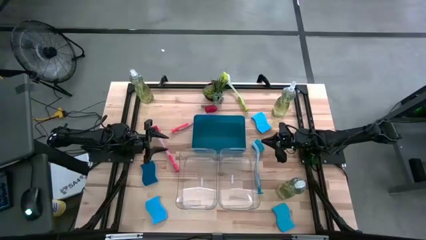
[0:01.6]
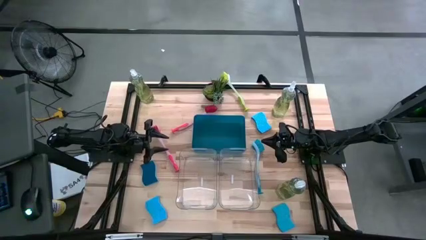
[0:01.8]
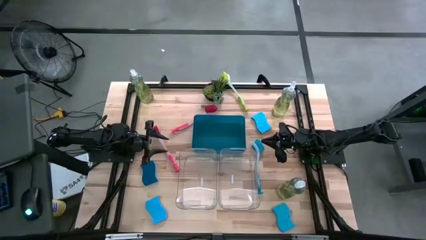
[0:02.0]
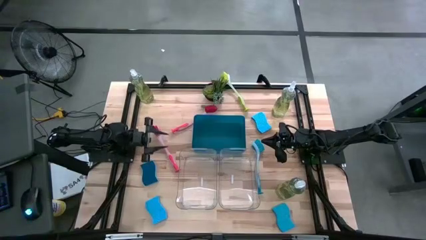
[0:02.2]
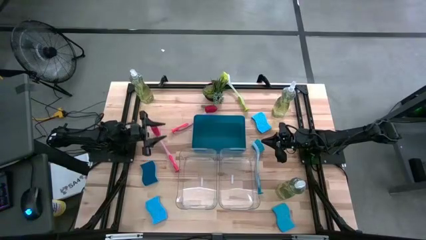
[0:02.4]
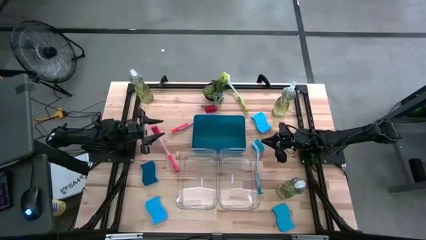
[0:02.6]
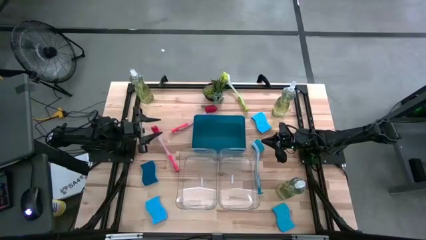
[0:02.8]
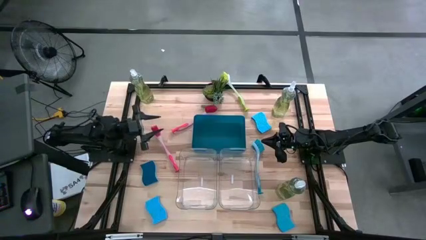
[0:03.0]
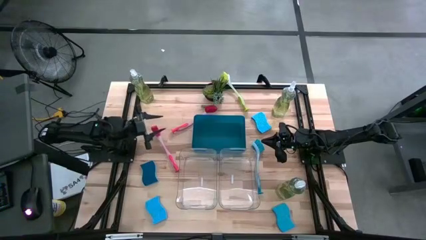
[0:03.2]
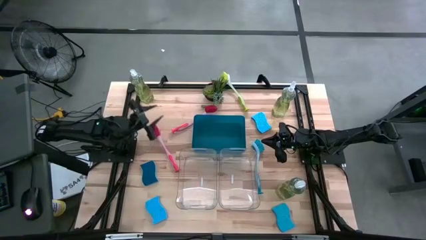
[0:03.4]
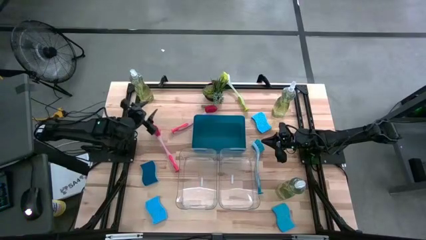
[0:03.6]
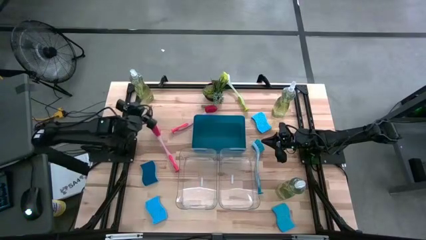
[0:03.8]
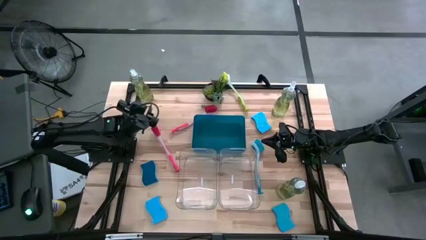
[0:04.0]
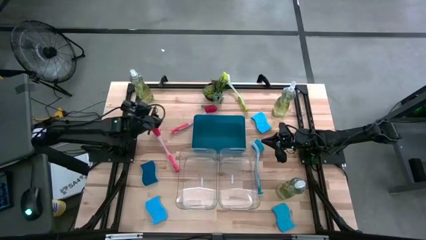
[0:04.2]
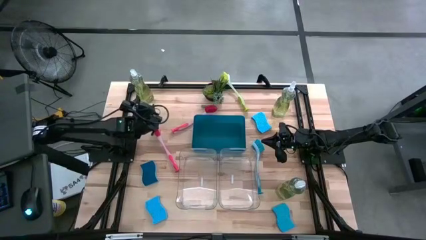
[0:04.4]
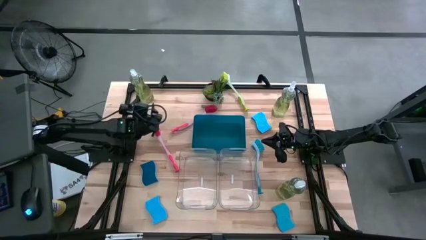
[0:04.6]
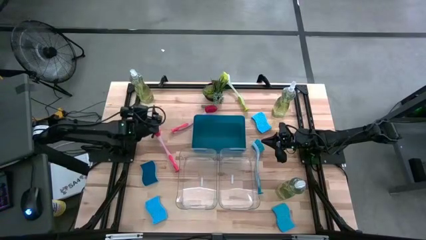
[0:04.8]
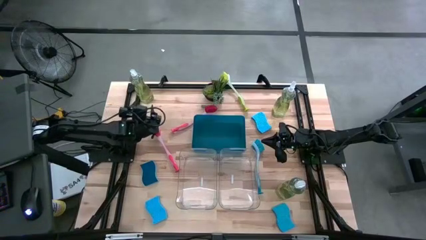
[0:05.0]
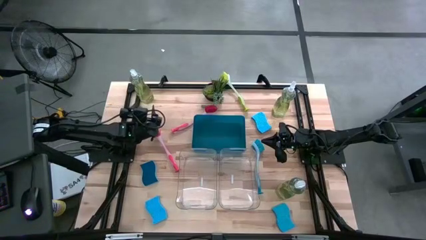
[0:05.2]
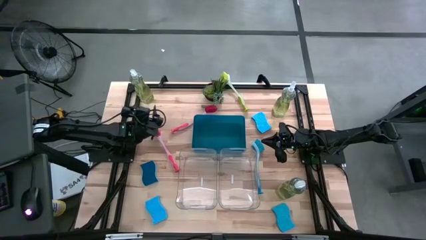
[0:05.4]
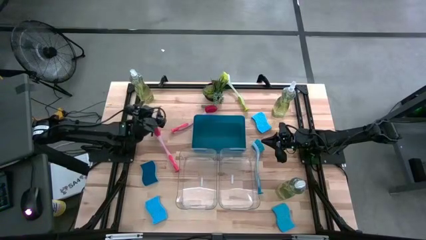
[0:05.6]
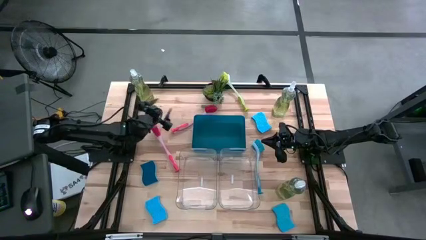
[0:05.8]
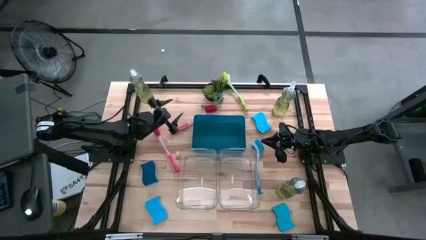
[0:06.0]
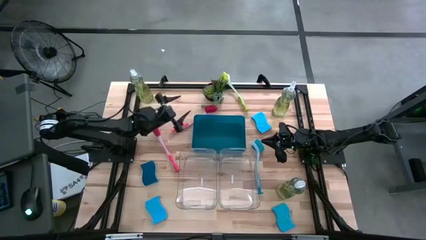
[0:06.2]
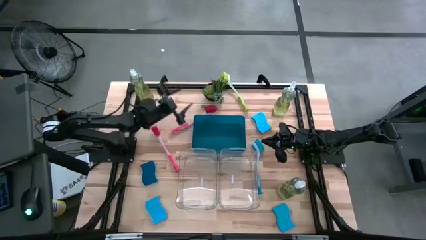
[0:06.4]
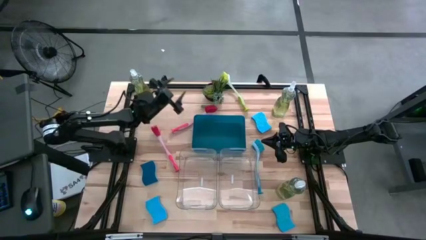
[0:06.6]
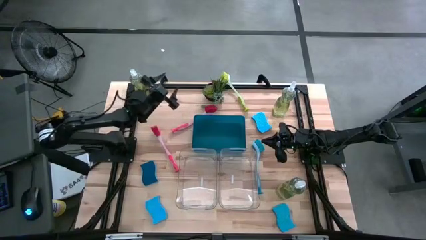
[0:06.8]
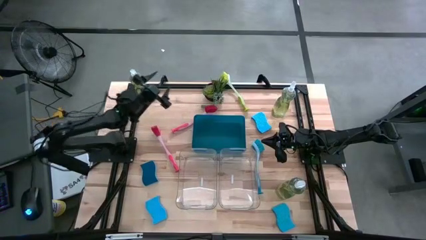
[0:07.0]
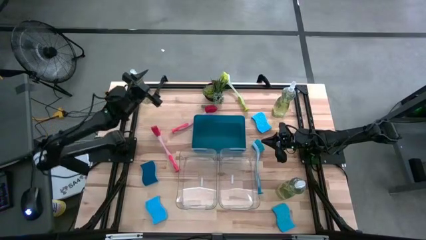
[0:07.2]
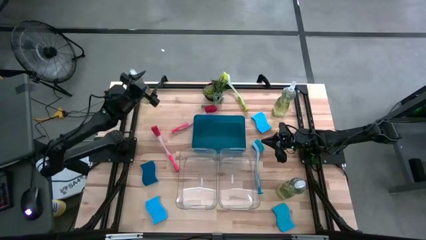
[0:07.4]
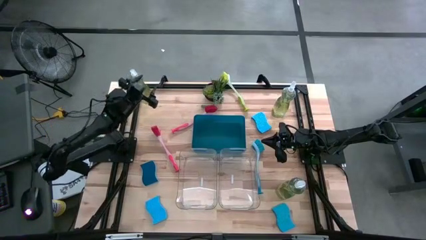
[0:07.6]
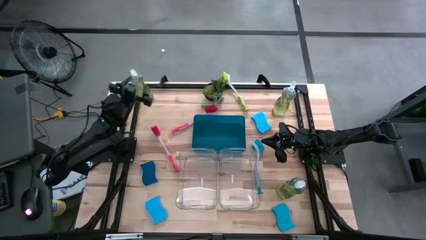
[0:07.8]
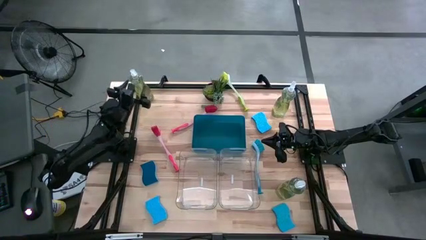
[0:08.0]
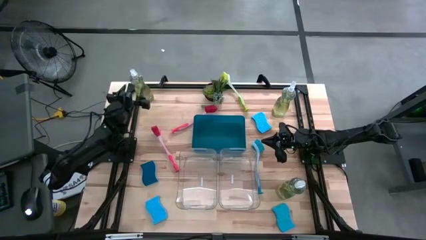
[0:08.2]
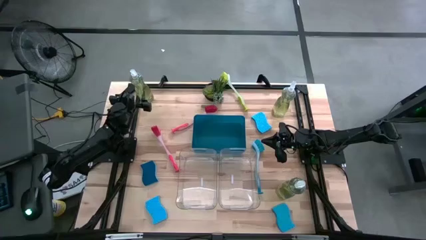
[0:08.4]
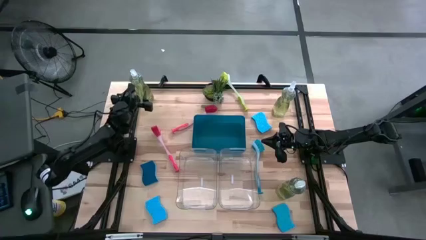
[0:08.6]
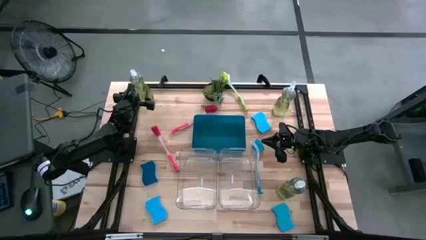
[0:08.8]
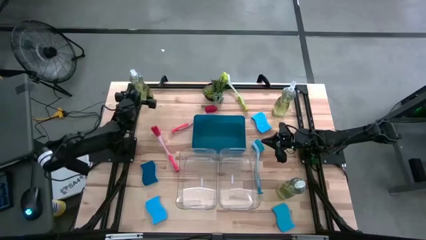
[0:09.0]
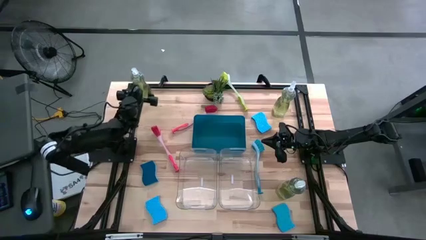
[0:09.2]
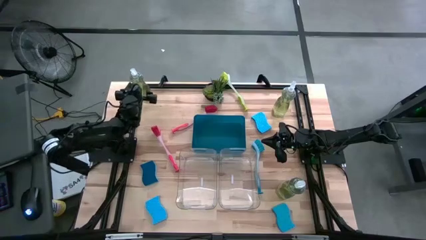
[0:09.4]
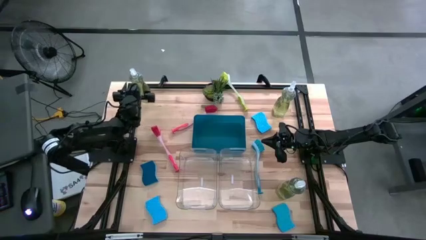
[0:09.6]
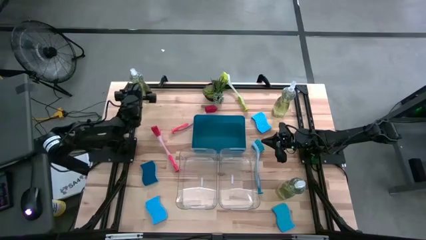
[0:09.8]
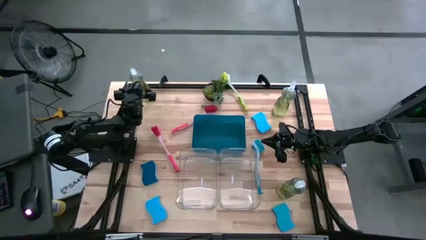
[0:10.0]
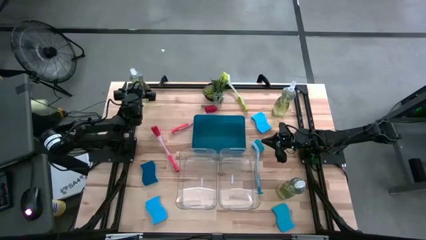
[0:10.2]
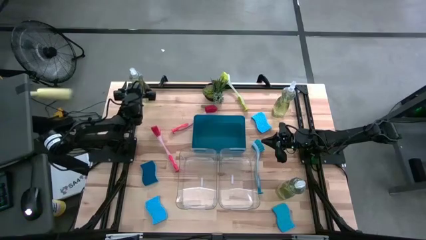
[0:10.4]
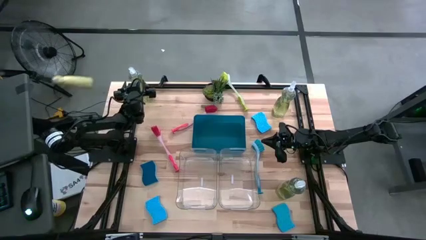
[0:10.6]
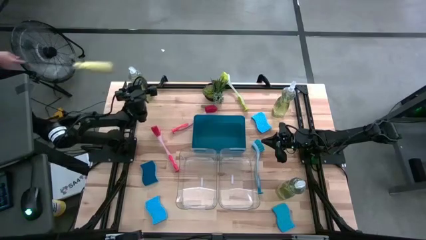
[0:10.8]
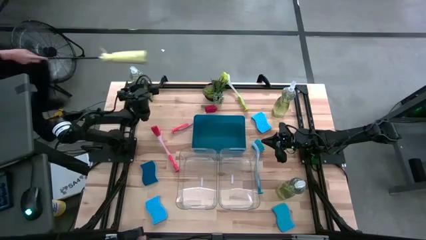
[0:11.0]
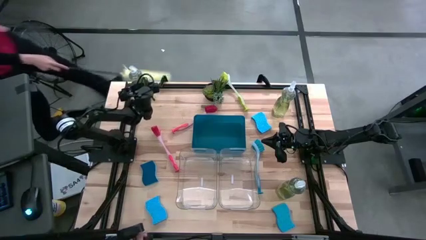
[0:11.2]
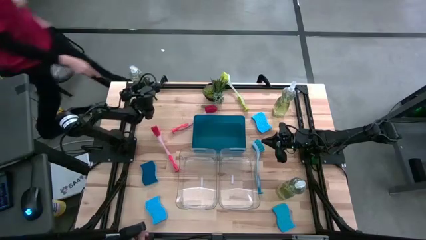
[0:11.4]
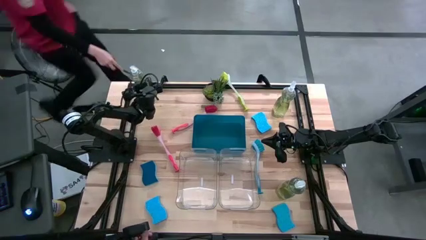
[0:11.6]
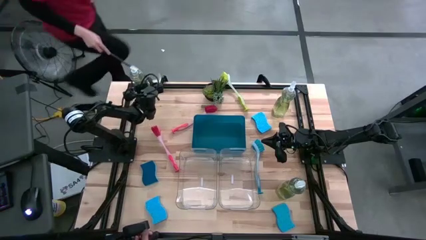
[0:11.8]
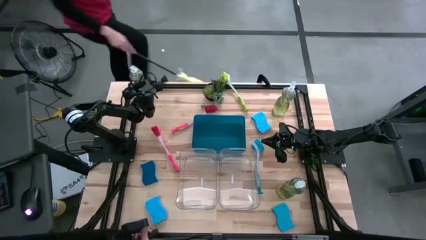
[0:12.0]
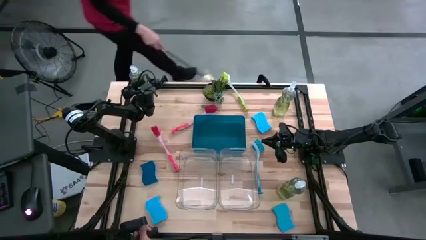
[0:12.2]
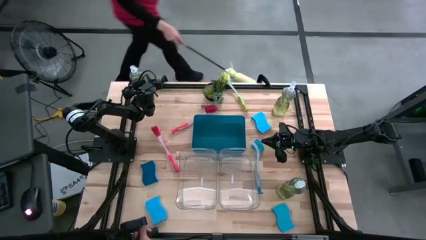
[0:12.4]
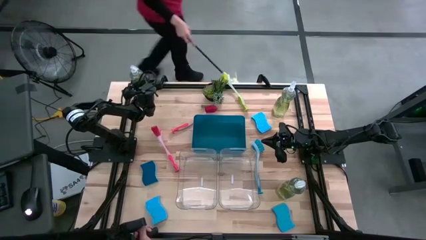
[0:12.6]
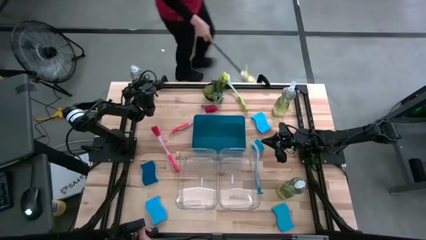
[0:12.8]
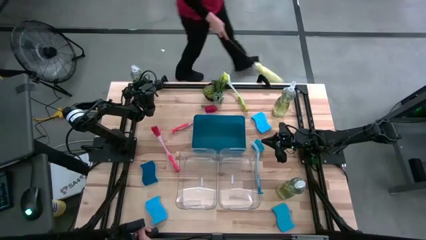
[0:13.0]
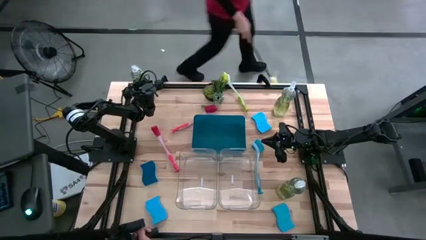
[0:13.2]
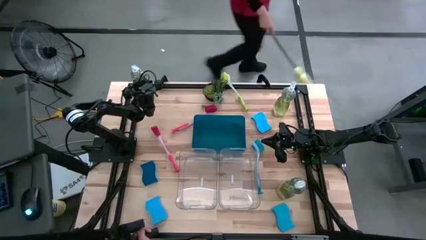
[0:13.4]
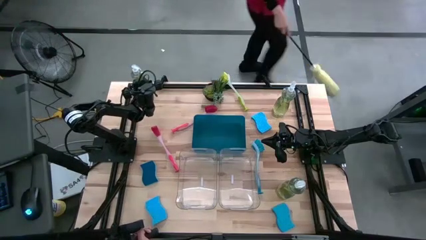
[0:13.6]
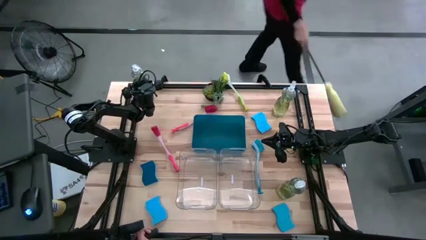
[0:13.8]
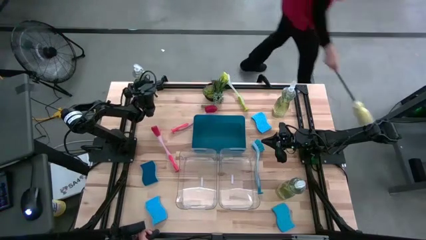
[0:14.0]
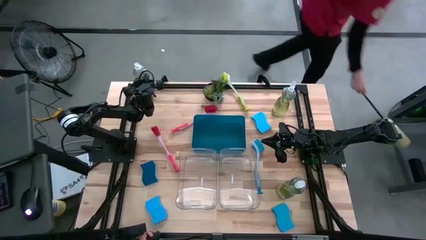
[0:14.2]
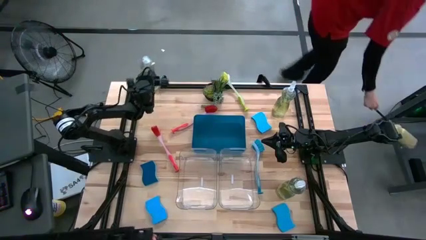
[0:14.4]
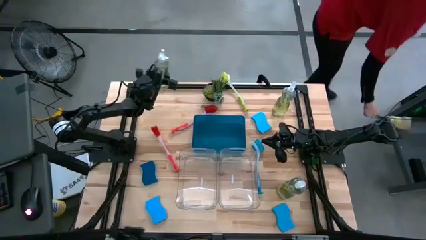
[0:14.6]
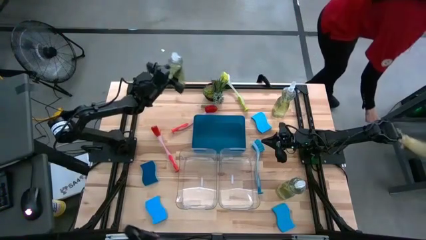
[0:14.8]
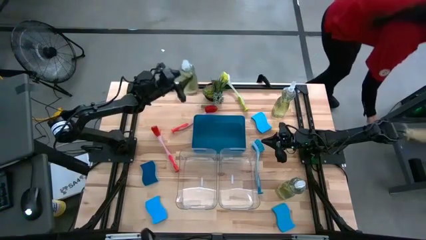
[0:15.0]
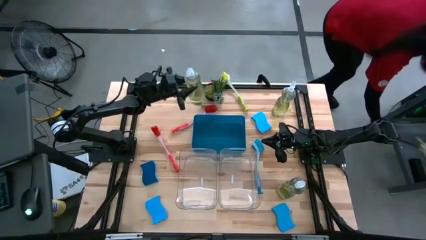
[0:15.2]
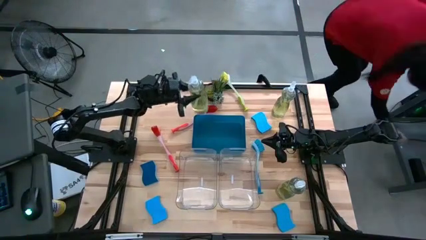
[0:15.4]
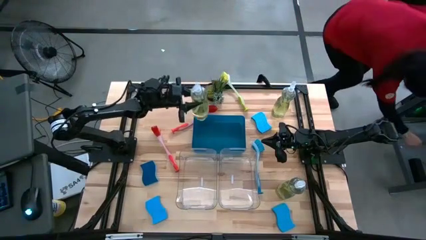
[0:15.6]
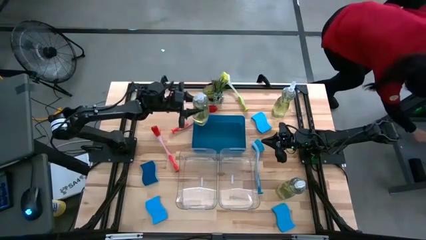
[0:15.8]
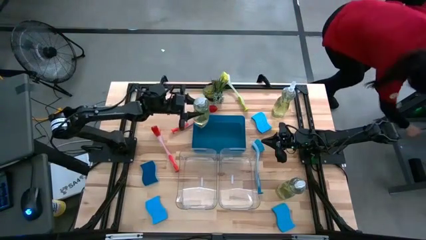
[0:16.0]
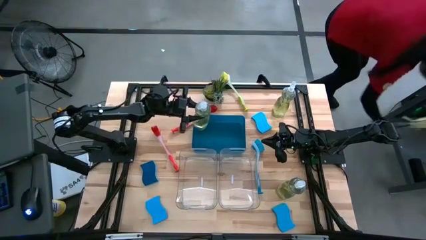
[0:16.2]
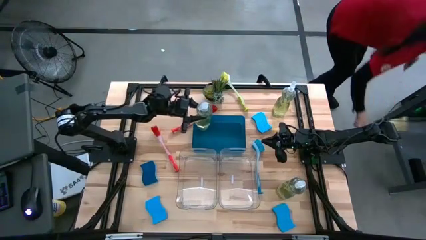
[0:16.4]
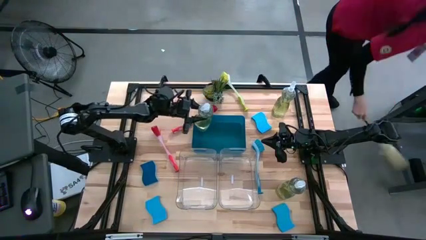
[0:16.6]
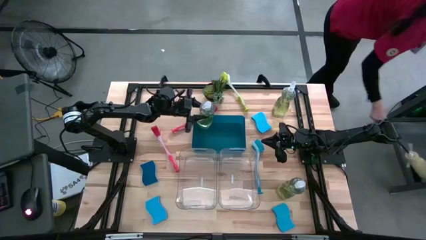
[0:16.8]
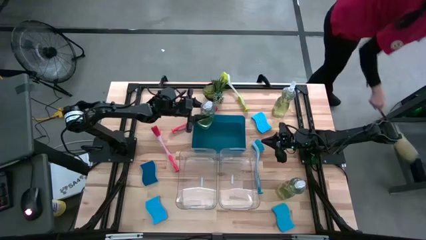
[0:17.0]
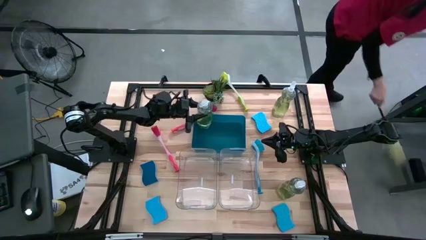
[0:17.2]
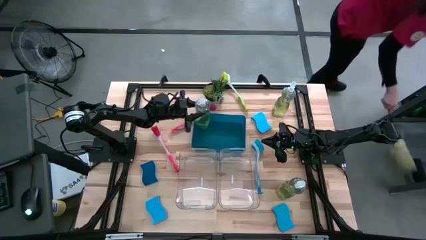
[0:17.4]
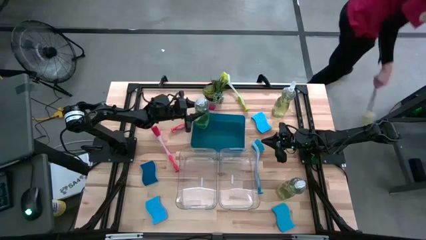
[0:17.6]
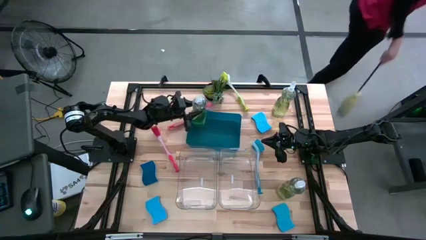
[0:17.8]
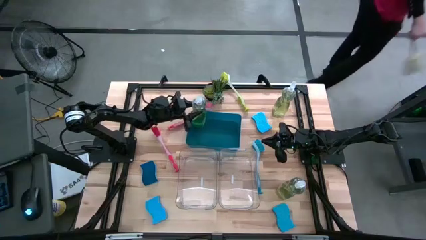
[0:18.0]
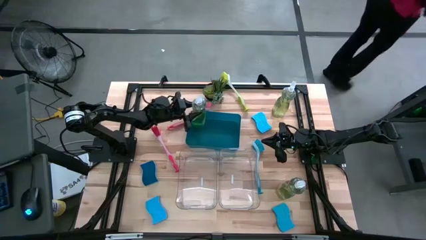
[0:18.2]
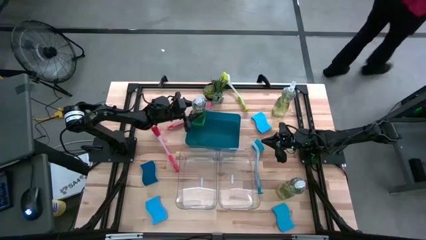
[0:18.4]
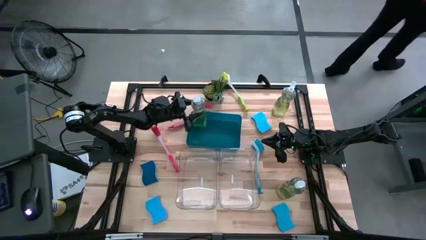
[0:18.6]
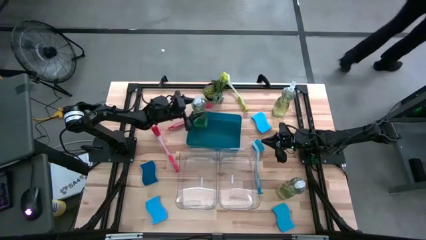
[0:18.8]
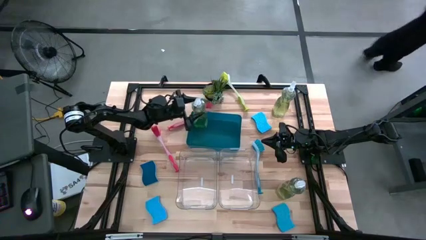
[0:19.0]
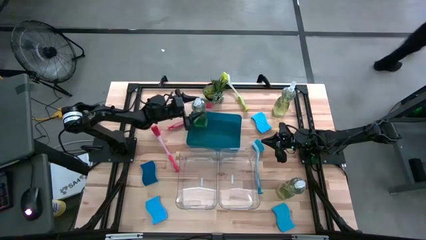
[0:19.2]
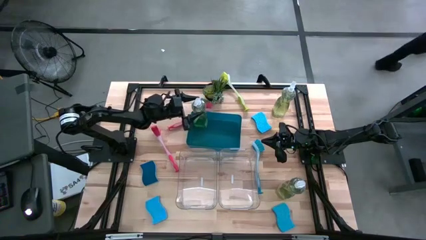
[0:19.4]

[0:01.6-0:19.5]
Task: Pick & Place Kitchen Sink Supplies
Put the green dish soap into the blue bin
